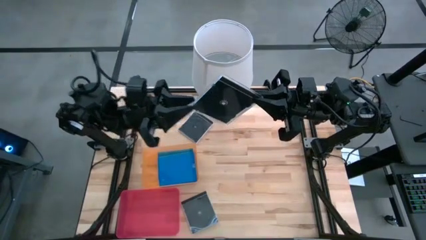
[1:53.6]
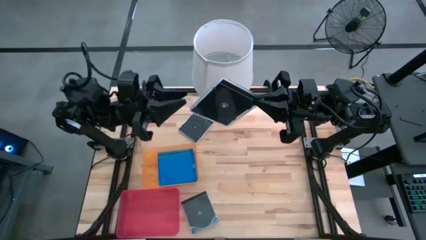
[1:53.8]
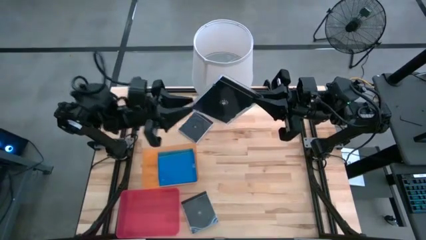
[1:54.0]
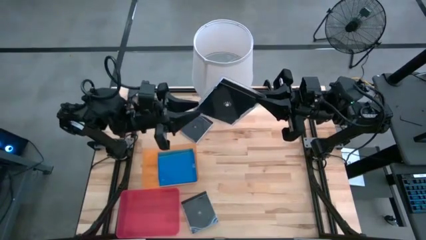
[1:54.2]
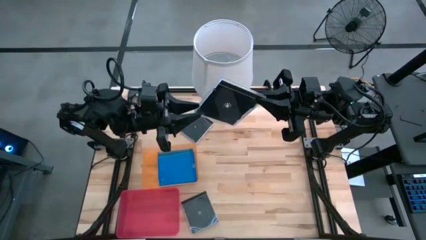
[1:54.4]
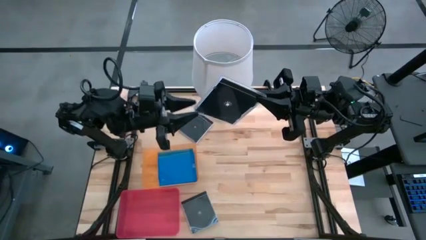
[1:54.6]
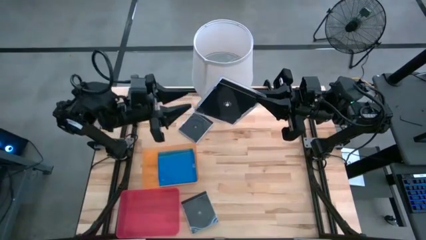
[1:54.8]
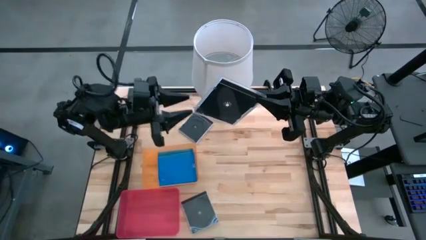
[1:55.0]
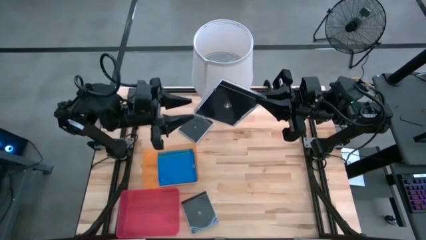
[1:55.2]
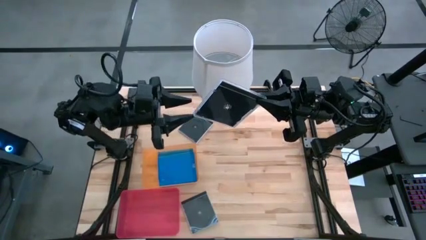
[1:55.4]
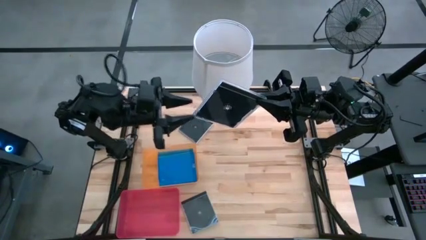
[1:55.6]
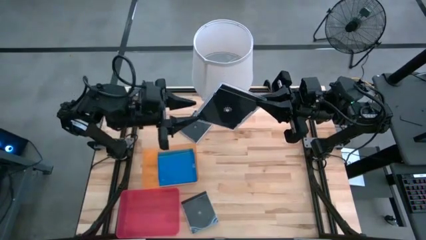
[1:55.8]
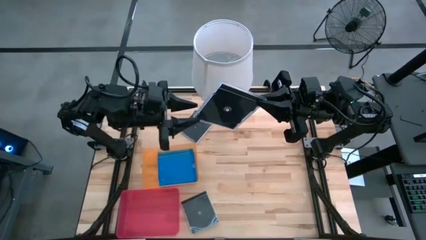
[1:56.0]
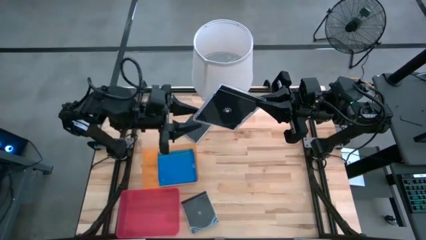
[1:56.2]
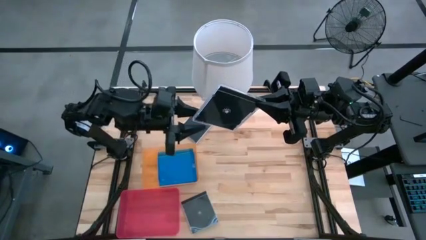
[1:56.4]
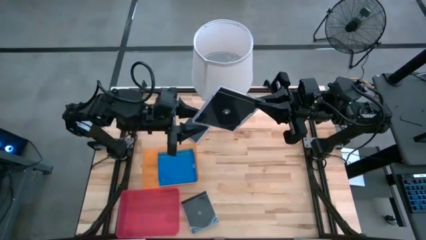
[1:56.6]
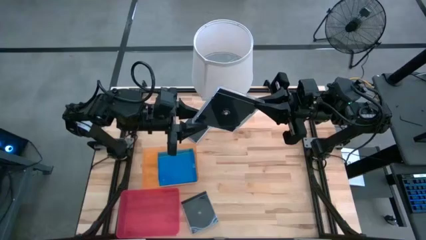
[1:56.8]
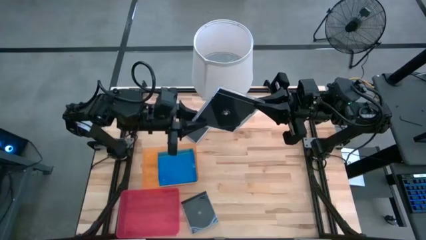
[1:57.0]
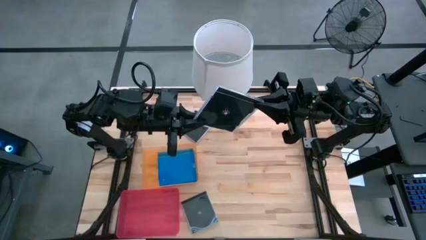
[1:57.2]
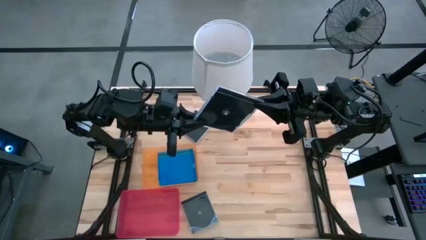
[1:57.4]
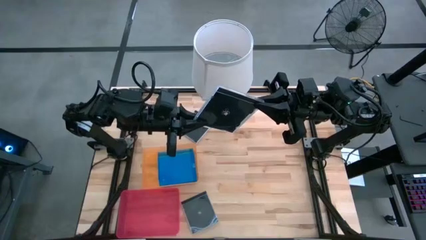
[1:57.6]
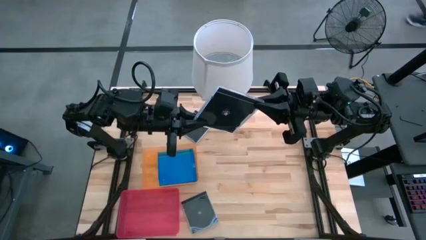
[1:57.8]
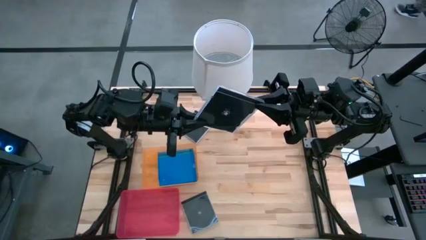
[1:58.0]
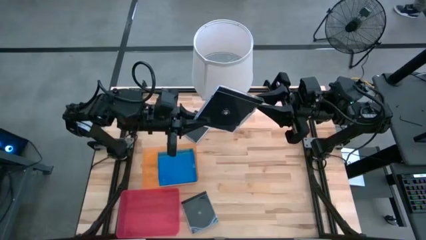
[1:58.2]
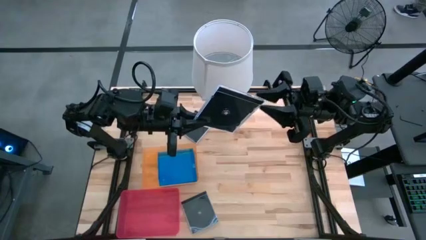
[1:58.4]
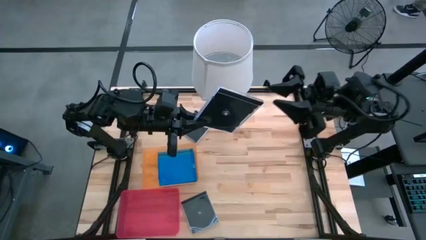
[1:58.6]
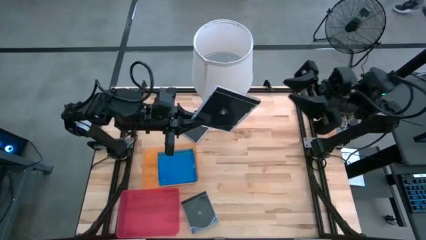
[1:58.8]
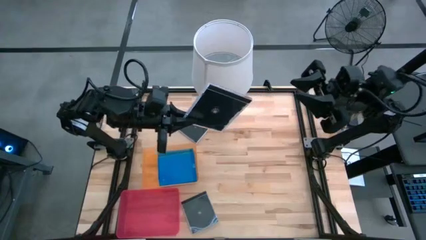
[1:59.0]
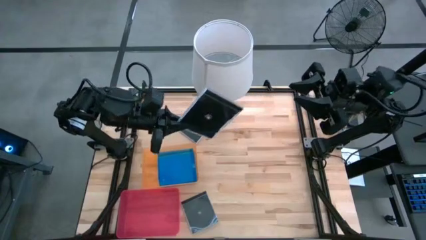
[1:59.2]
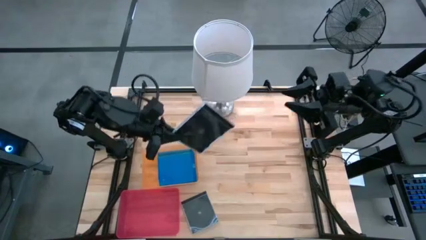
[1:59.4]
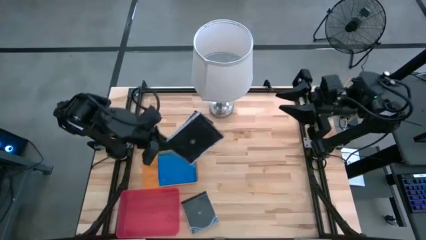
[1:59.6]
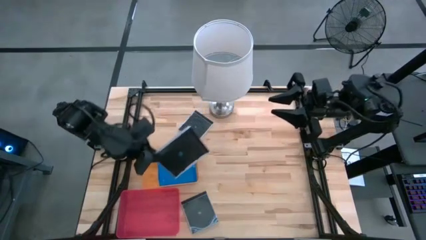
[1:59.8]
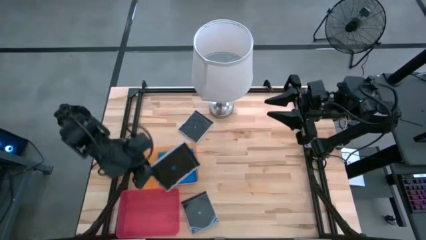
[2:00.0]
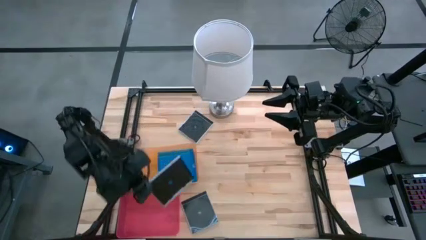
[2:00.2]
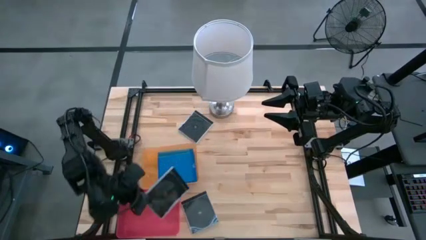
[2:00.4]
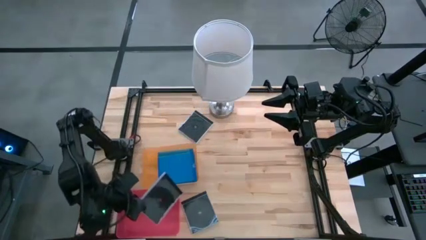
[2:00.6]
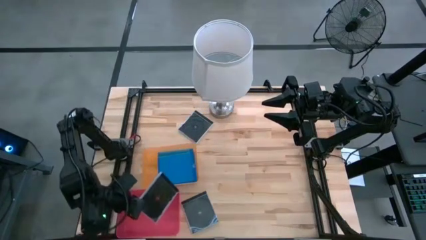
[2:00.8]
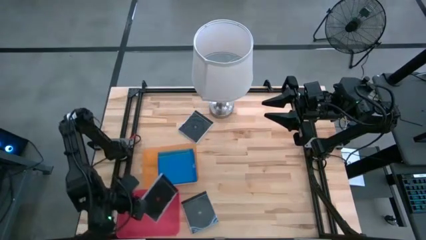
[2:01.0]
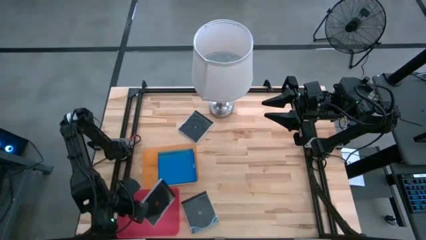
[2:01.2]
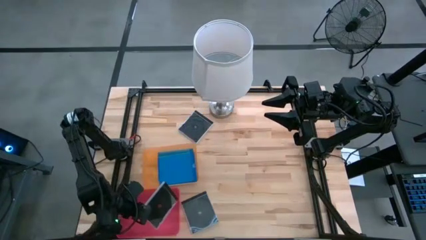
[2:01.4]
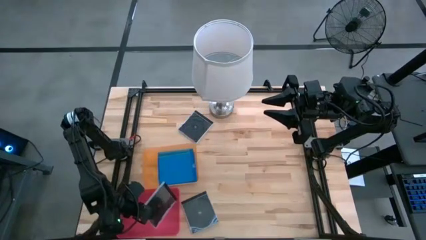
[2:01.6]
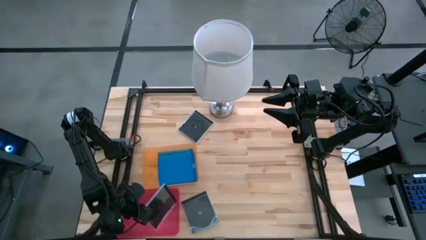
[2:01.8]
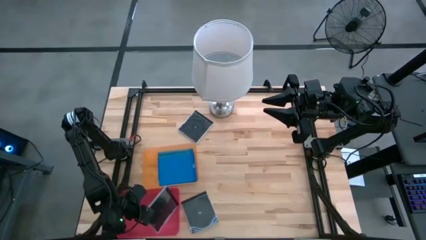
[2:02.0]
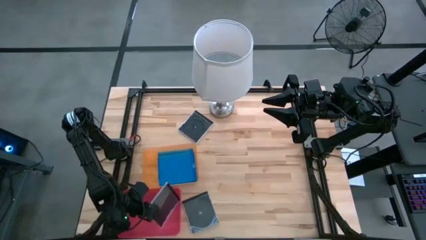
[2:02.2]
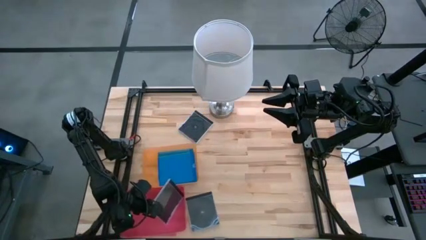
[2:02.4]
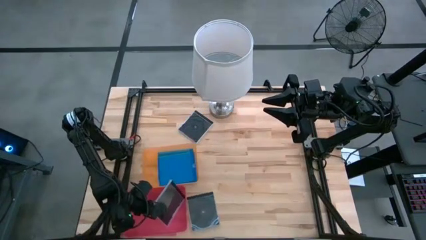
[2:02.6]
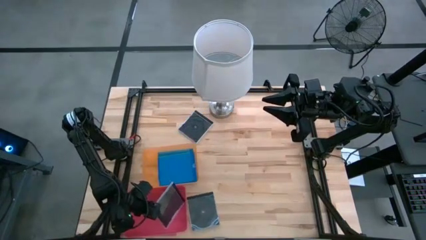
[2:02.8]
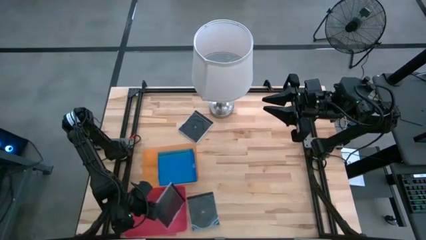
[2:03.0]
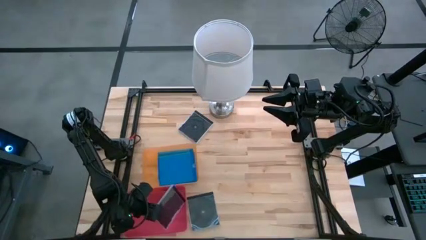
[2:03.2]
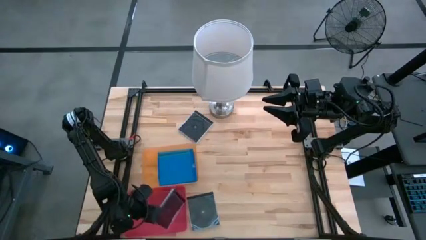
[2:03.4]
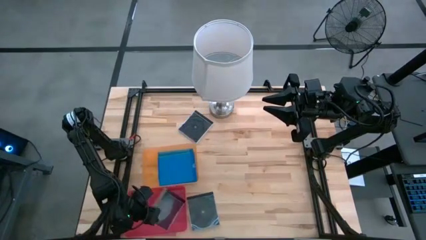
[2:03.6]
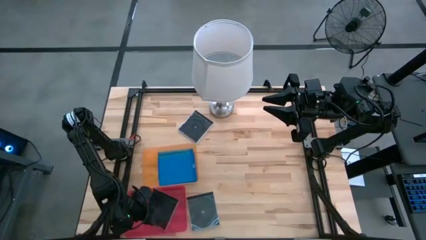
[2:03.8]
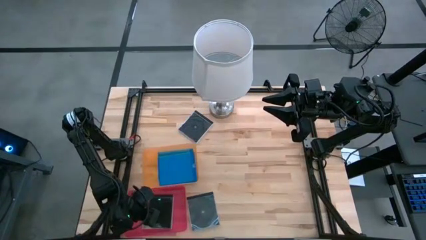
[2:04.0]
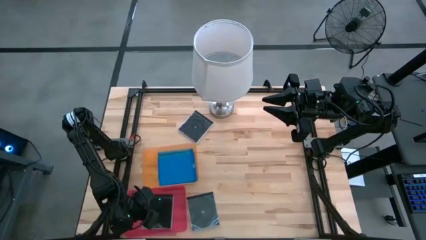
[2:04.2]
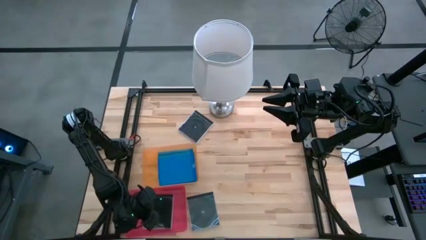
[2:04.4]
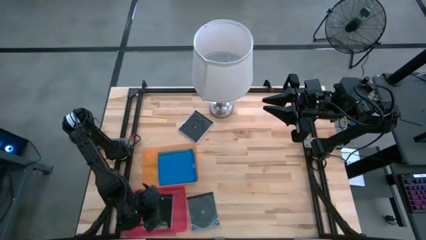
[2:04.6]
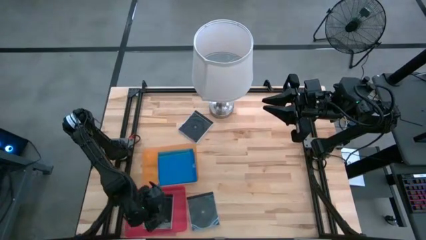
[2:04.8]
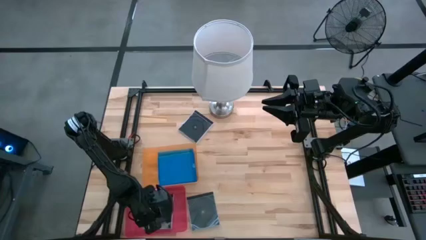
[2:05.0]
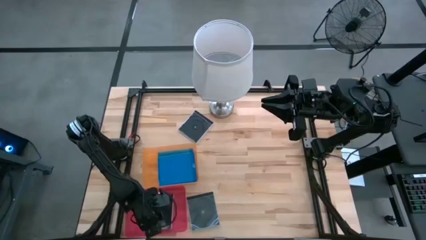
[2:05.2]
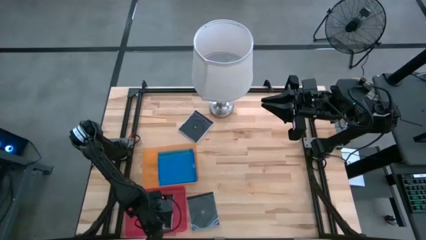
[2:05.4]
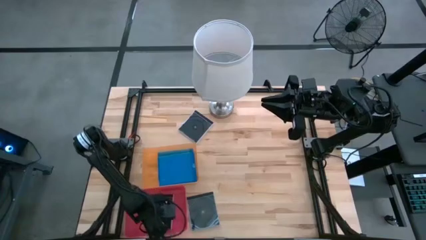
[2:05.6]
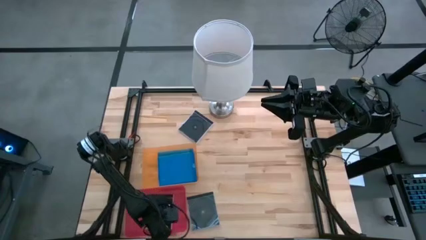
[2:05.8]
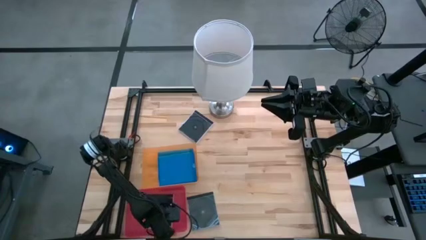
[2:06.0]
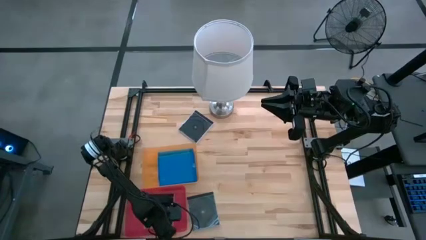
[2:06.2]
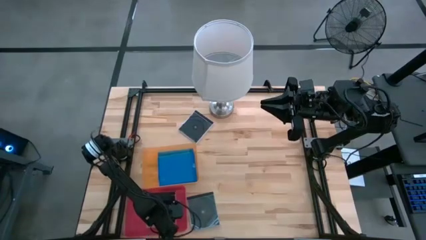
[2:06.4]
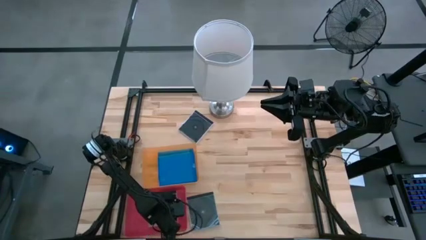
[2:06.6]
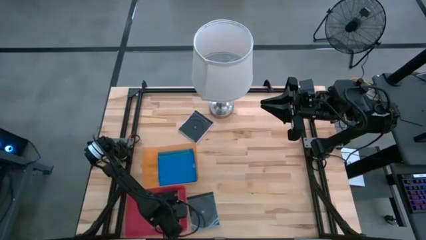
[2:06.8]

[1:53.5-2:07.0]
Task: Pick & place jewel cases by type
Put the middle black cd case into the pink bin

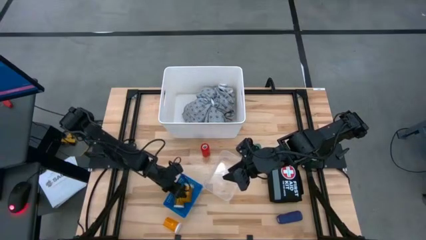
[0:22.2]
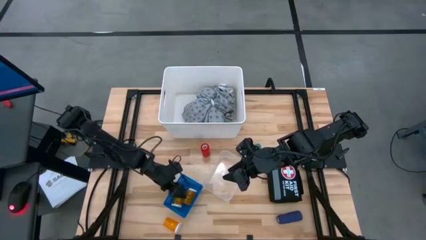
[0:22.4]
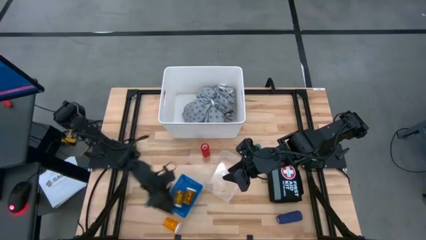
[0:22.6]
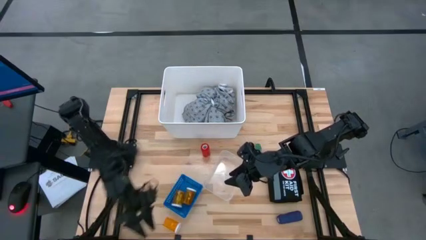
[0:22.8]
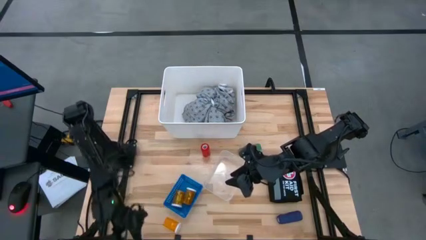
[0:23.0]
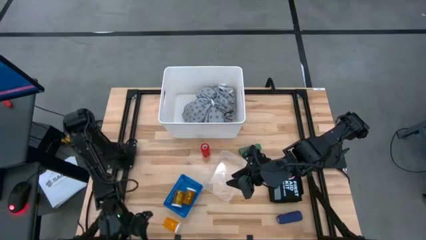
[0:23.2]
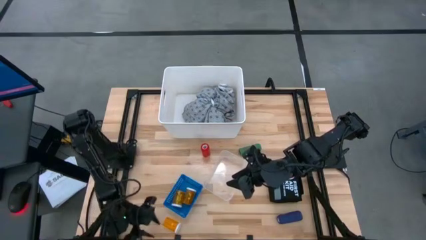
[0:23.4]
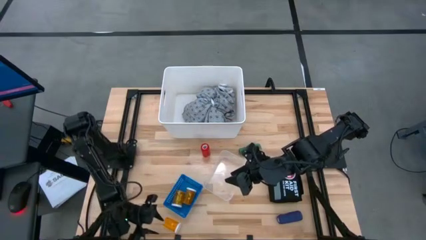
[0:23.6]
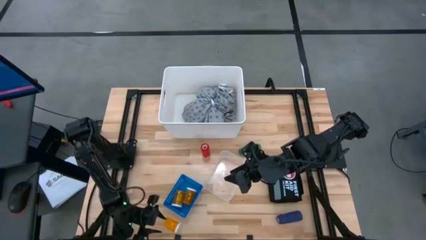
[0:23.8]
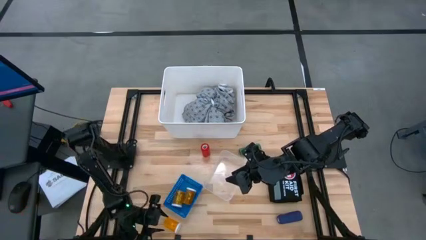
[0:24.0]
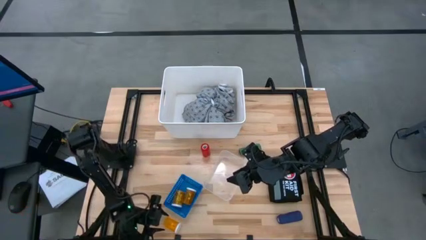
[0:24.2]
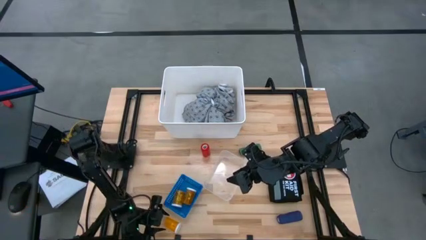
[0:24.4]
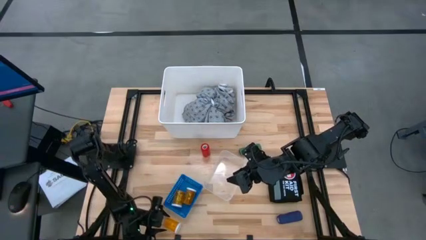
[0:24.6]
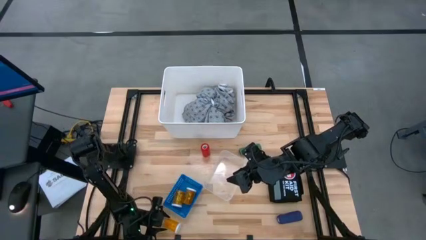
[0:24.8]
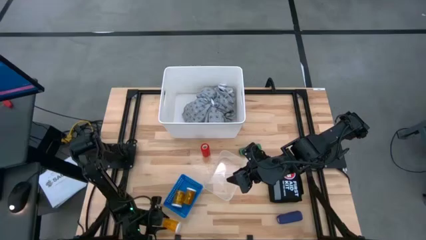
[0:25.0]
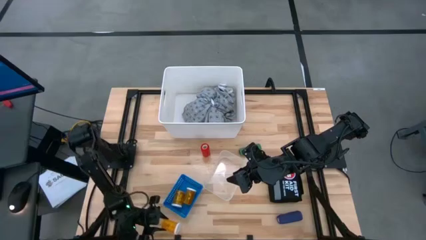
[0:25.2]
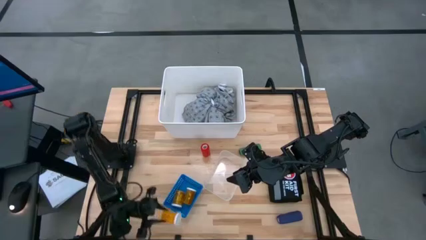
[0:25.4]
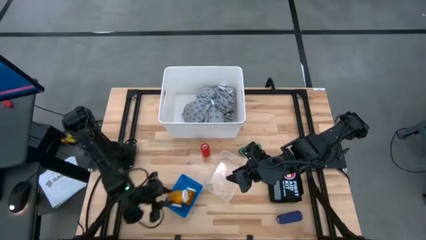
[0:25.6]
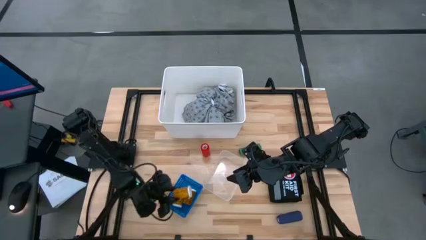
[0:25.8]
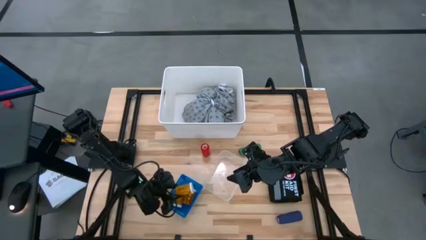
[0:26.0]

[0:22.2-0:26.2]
Task: Pick & Place Medicine items
Put the yellow bottle into the blue bin
